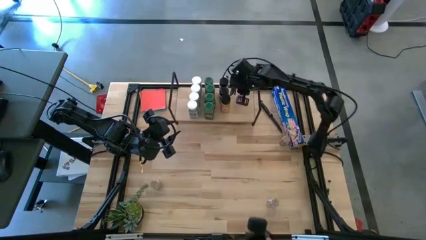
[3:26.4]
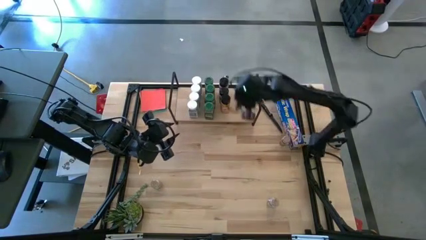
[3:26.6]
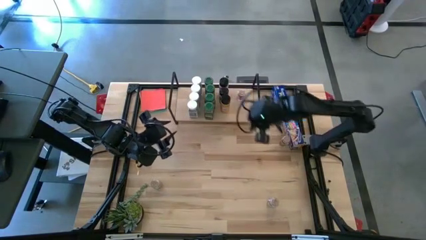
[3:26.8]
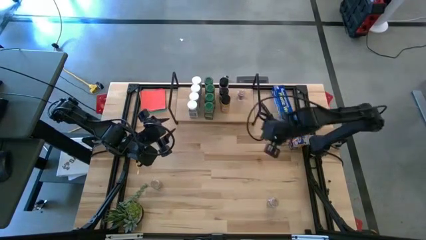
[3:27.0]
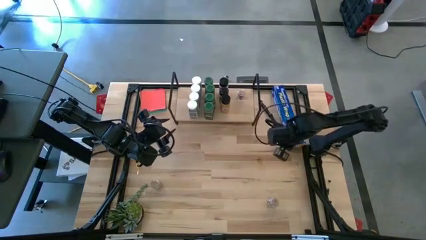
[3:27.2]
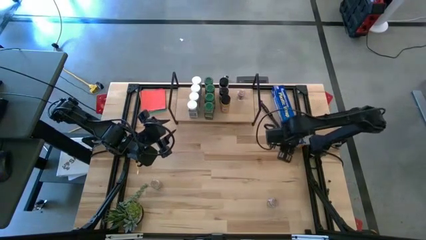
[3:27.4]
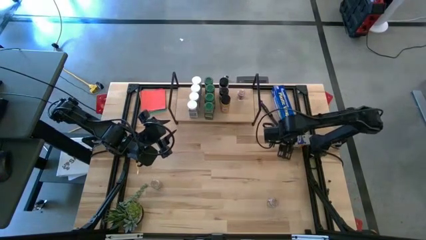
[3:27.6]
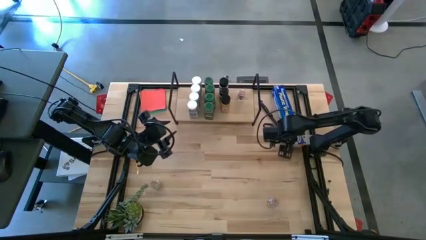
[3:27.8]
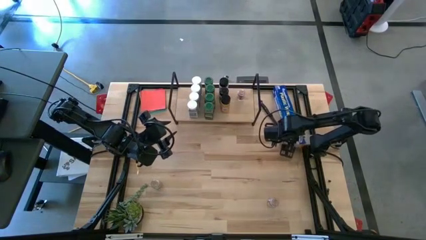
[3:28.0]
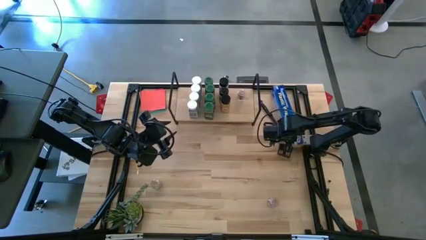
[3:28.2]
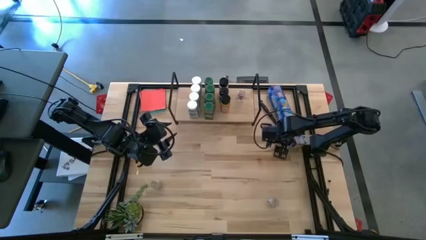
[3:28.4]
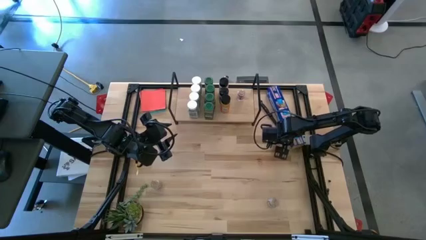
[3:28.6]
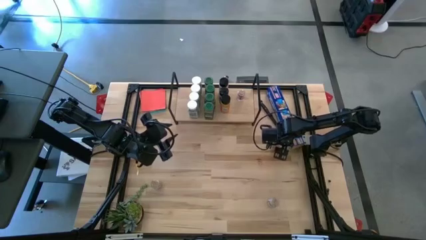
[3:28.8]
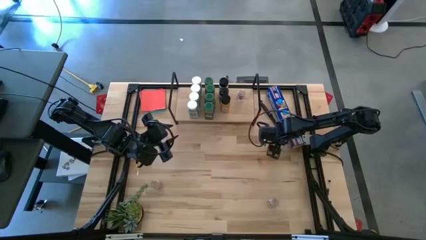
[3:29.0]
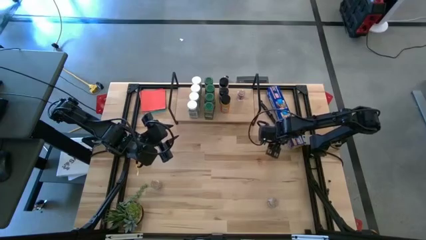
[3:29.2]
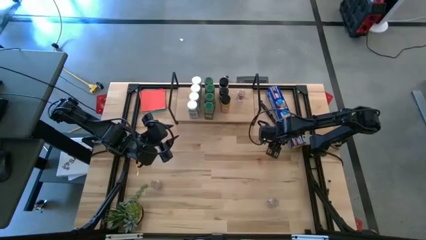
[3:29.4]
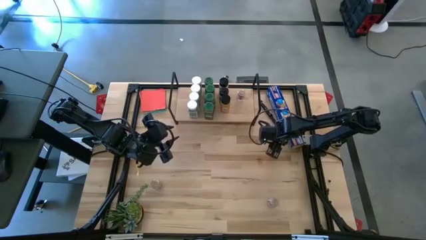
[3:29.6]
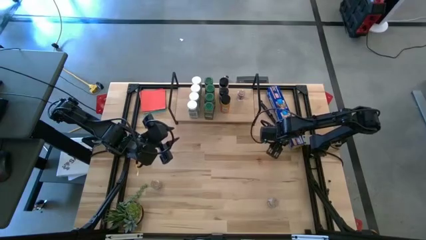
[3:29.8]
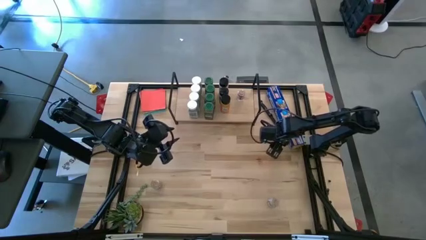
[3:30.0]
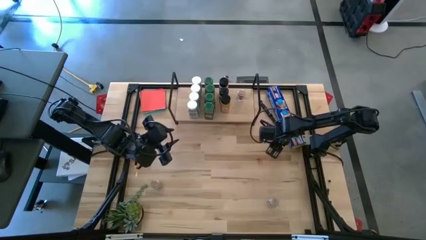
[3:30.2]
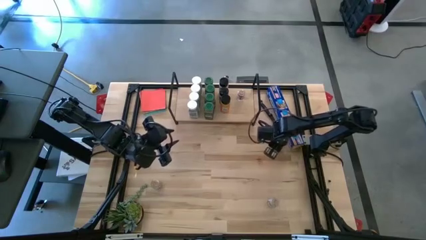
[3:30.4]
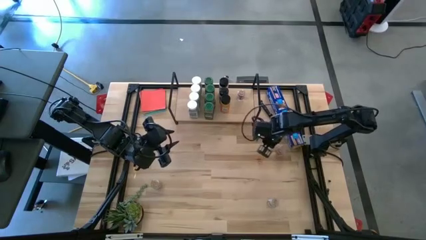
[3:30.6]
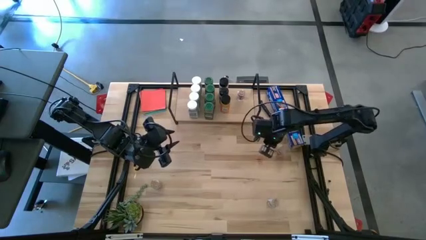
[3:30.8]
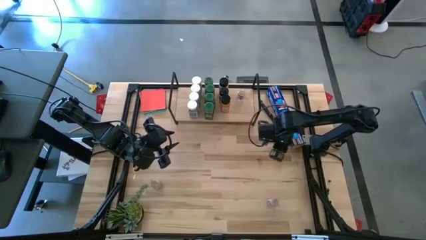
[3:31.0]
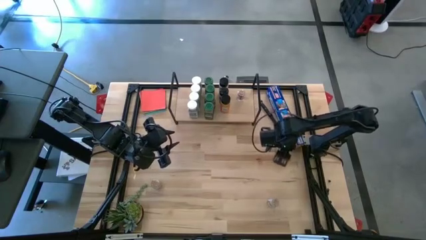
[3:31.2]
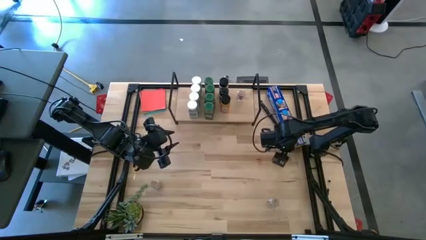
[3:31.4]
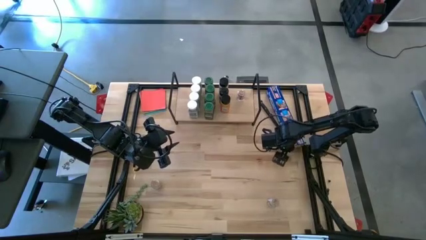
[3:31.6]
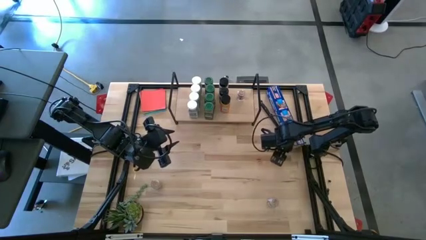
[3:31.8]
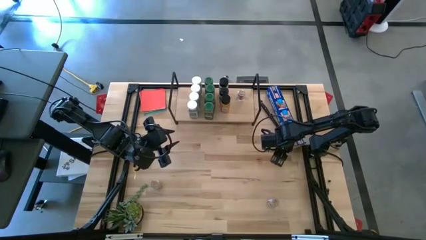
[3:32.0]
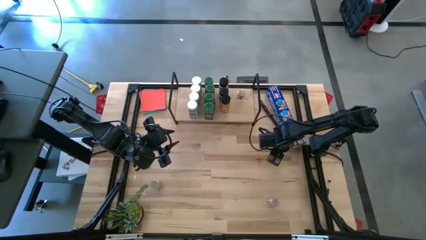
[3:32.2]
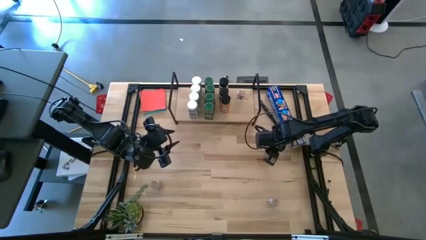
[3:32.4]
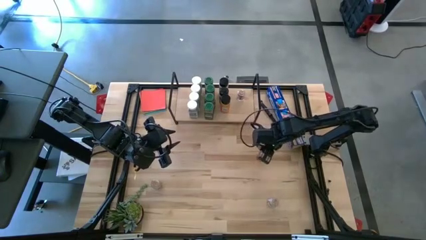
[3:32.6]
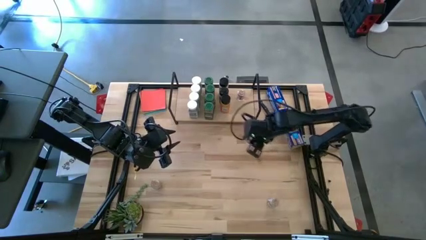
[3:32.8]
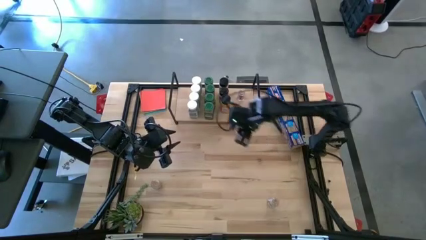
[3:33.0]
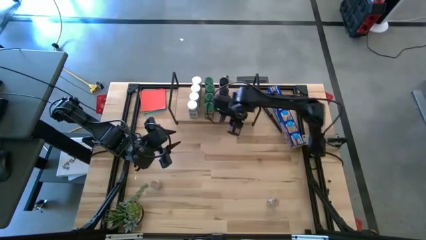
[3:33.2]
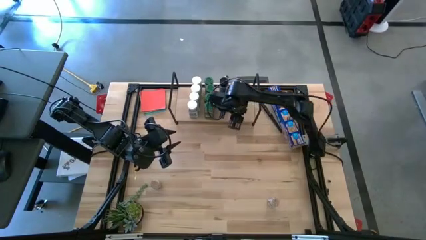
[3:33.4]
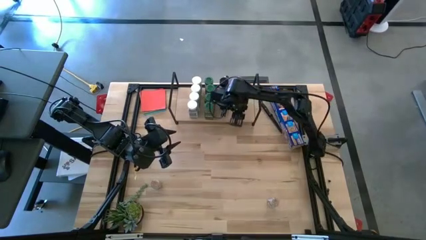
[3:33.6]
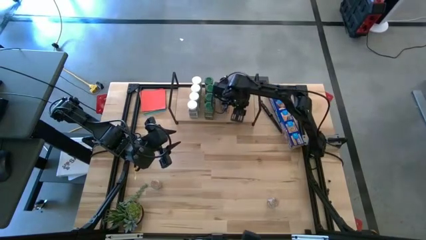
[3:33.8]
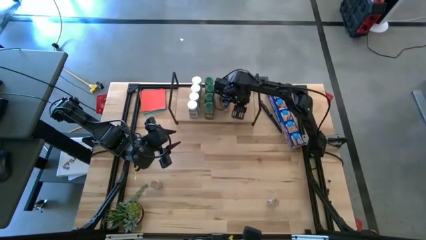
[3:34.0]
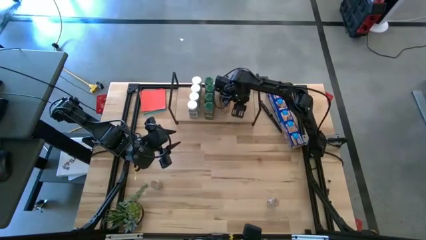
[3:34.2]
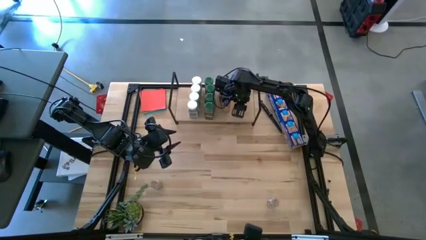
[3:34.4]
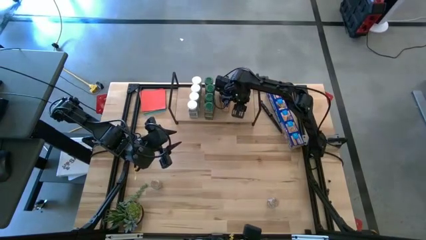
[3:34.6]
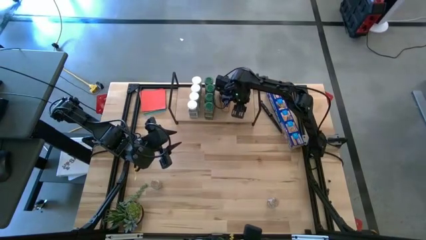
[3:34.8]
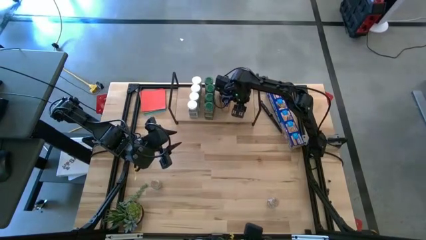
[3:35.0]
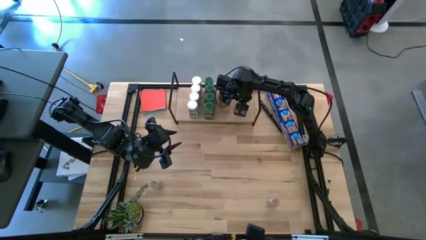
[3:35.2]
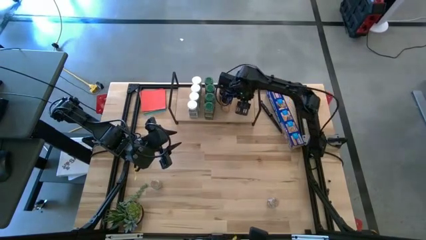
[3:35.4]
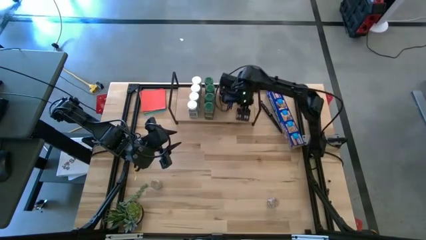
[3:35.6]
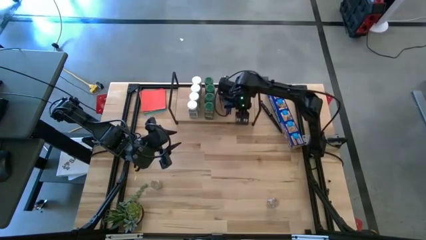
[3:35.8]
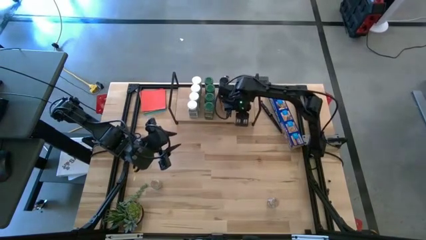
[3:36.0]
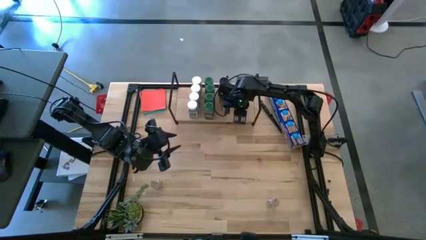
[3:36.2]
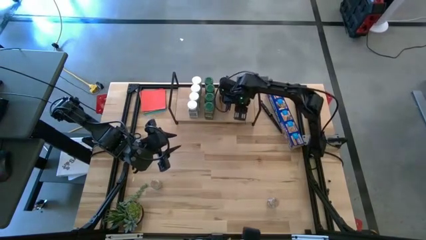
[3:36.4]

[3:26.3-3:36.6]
Task: Shelf spices
Put the top right brown seasoning bottle on the shelf

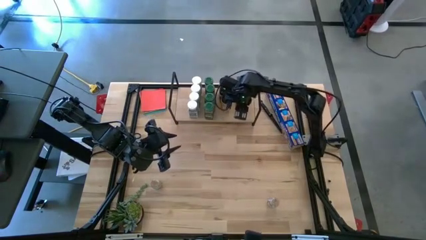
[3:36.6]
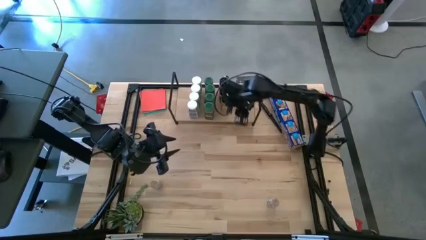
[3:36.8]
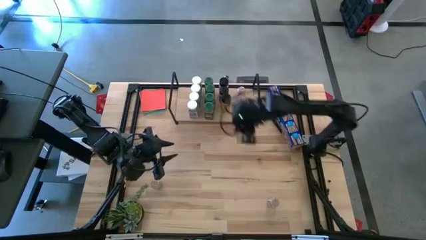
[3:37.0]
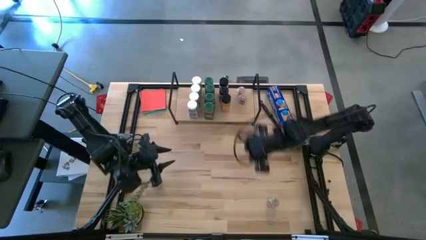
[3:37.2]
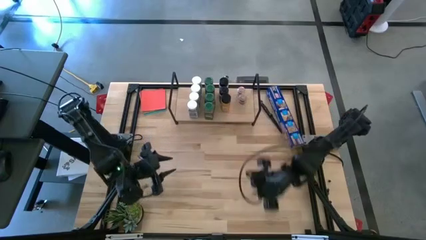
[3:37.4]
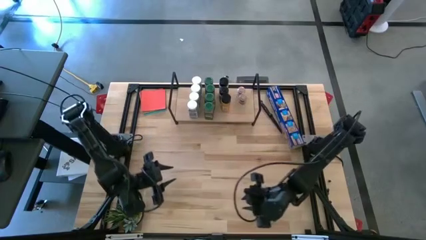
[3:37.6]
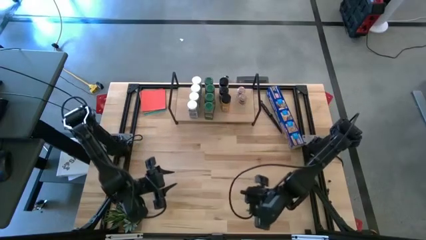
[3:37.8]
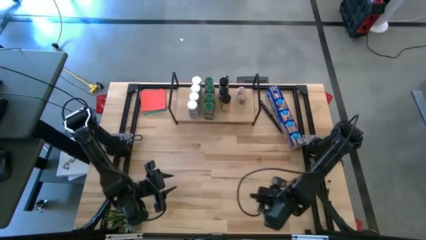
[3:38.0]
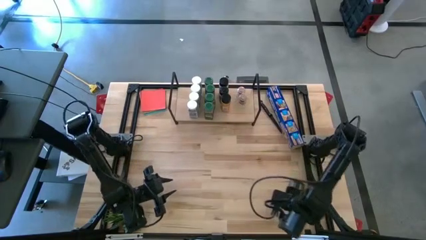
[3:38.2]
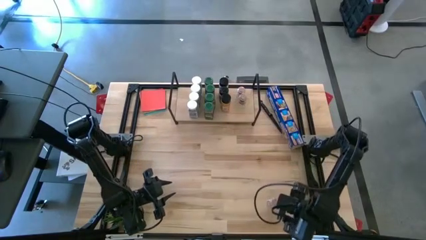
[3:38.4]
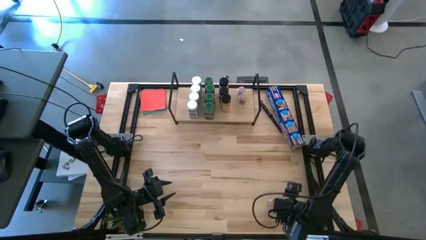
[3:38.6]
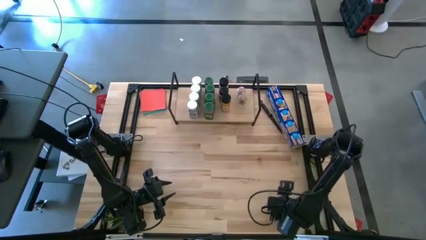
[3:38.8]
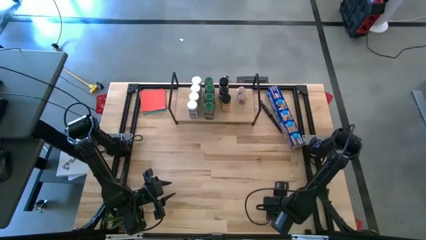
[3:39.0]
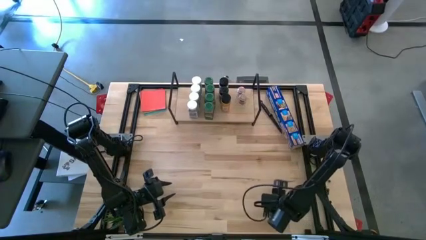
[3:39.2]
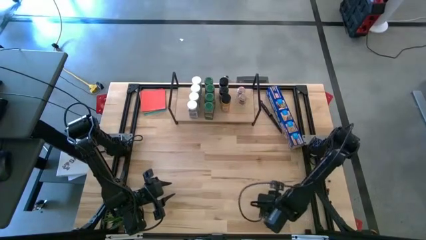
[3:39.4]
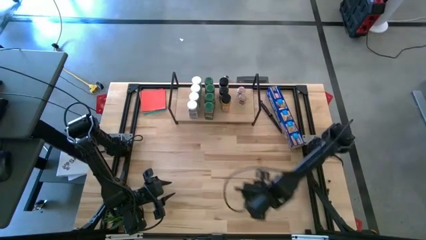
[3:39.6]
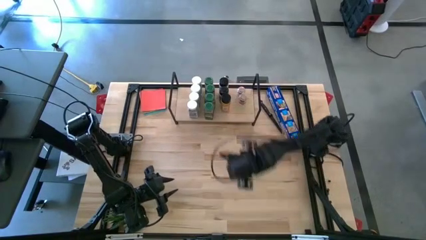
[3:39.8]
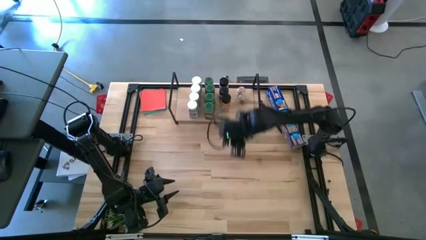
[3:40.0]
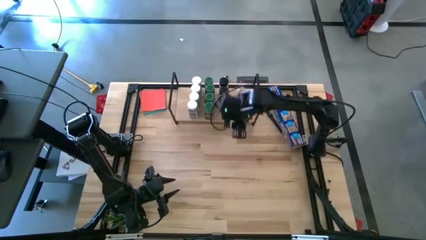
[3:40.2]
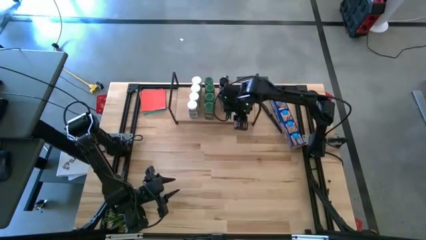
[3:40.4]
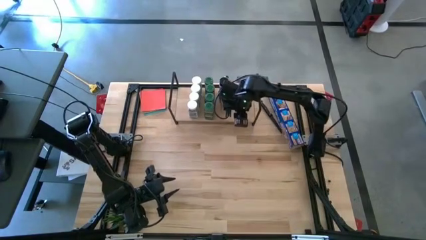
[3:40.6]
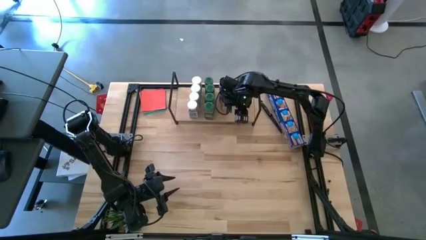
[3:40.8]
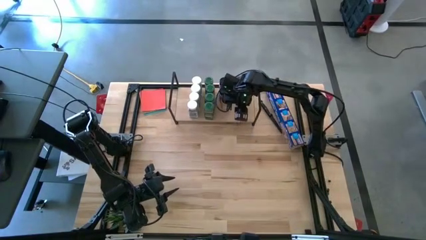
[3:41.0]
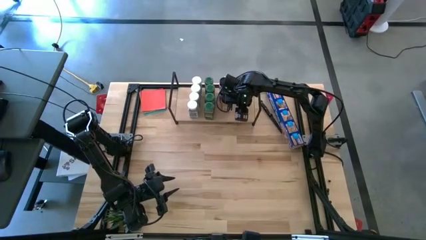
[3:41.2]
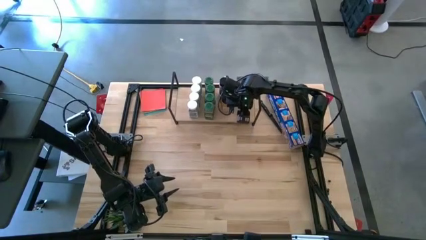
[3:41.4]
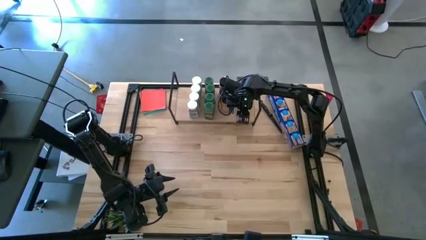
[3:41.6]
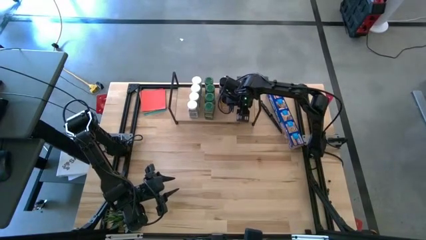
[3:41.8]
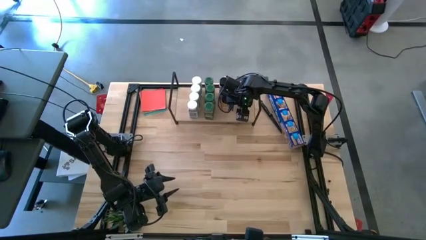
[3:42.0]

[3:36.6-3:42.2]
Put the right brown seasoning bottle on the shelf
